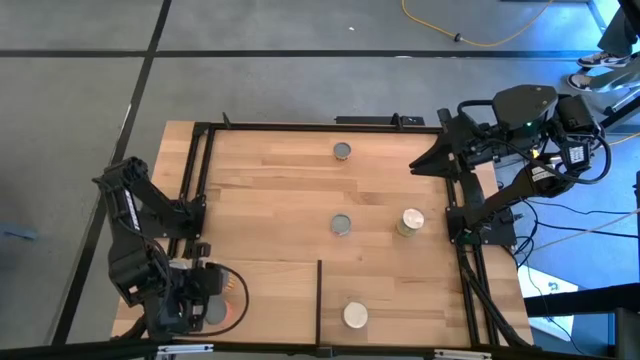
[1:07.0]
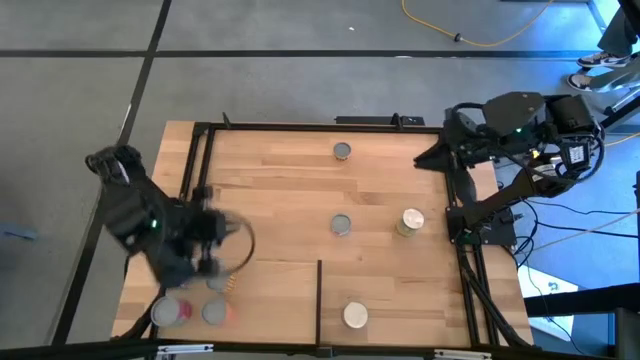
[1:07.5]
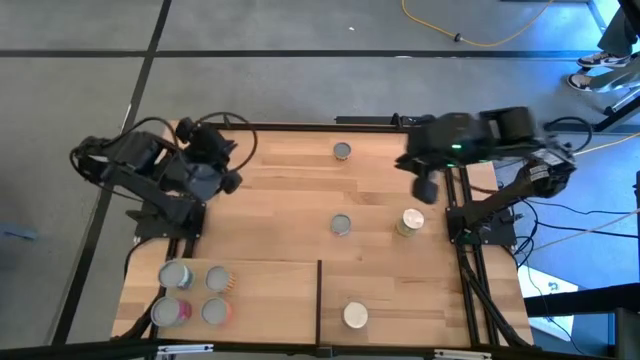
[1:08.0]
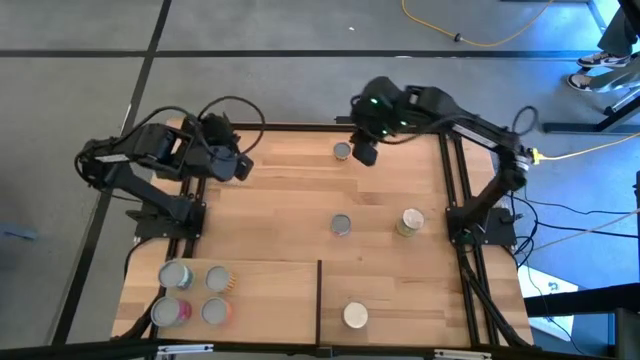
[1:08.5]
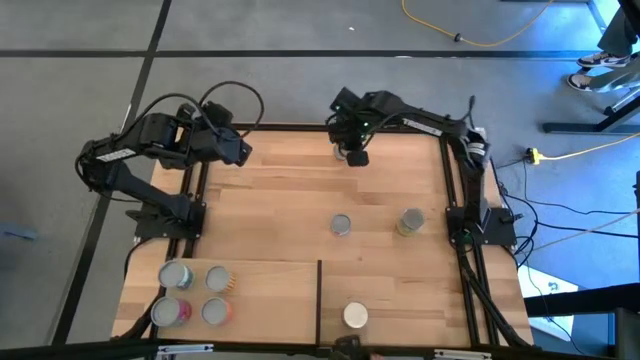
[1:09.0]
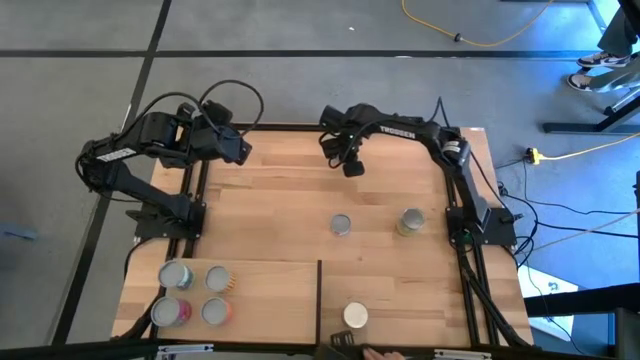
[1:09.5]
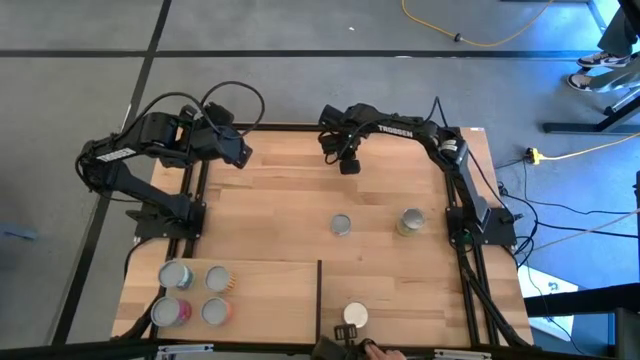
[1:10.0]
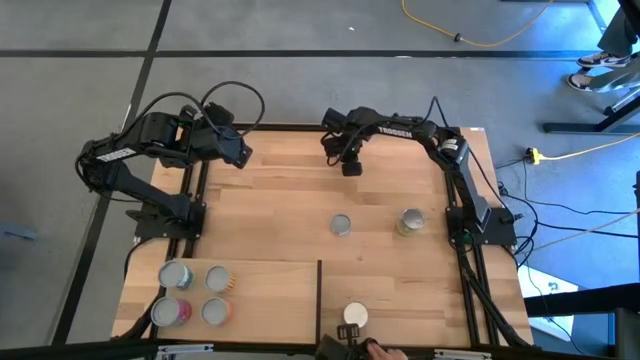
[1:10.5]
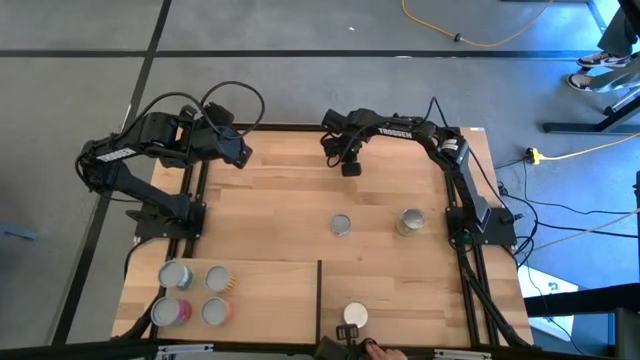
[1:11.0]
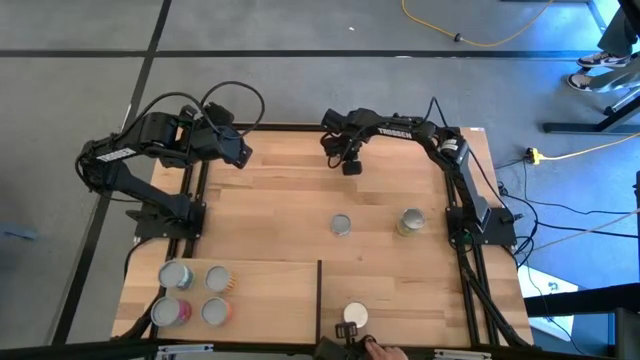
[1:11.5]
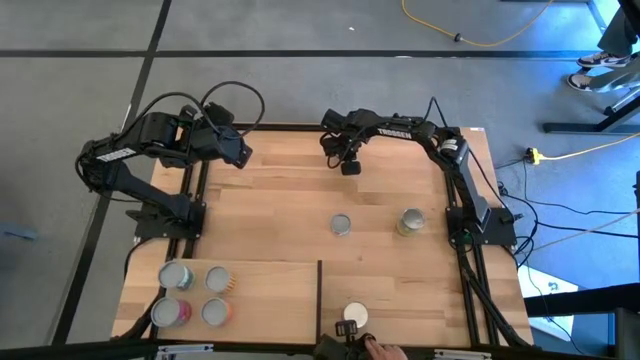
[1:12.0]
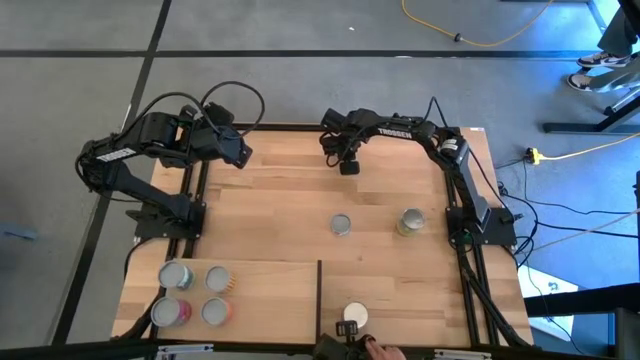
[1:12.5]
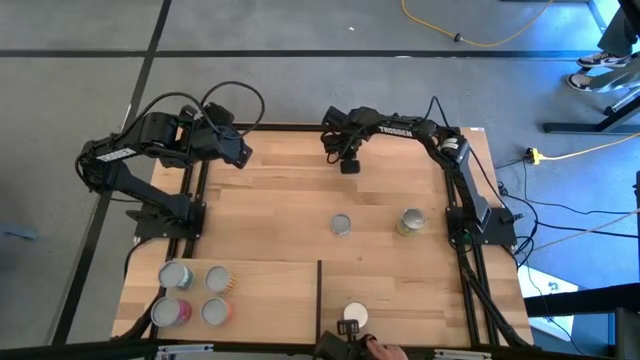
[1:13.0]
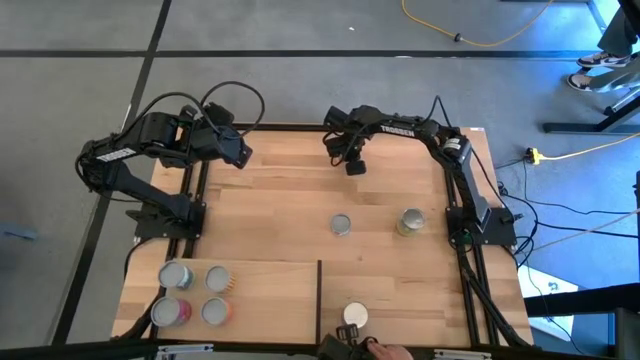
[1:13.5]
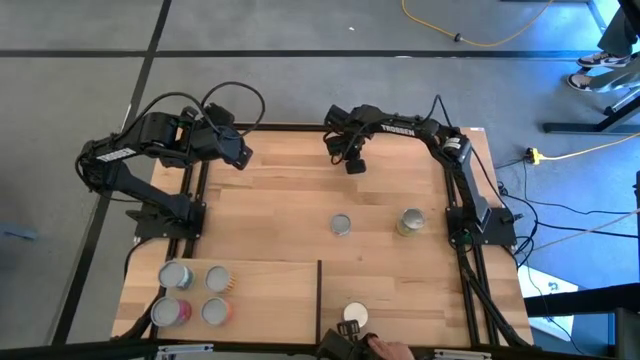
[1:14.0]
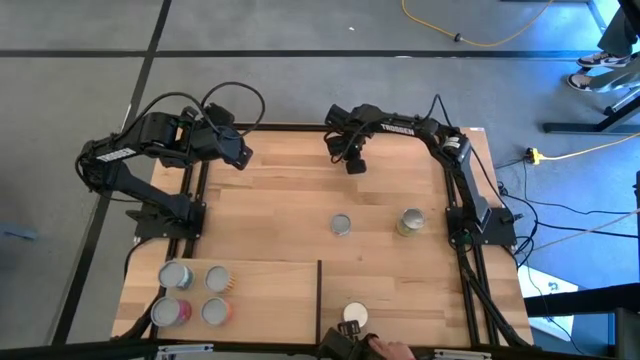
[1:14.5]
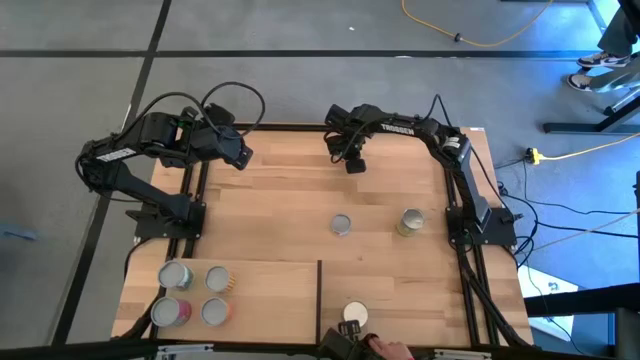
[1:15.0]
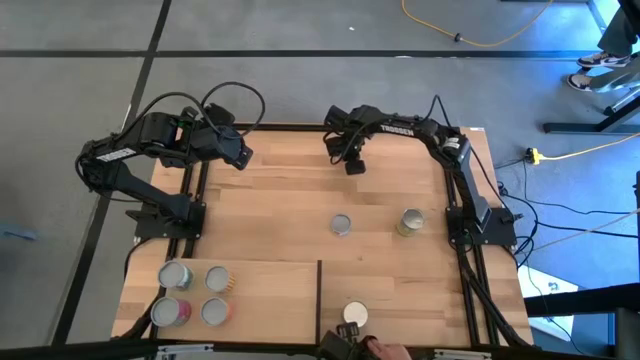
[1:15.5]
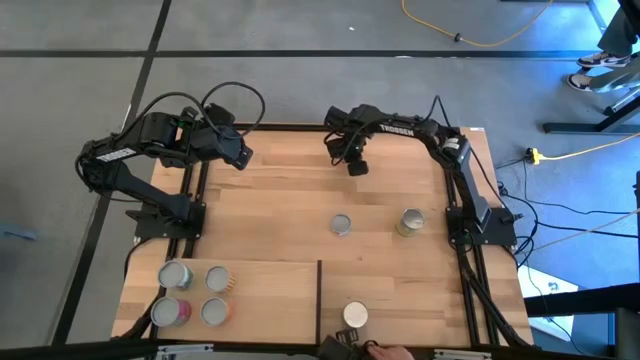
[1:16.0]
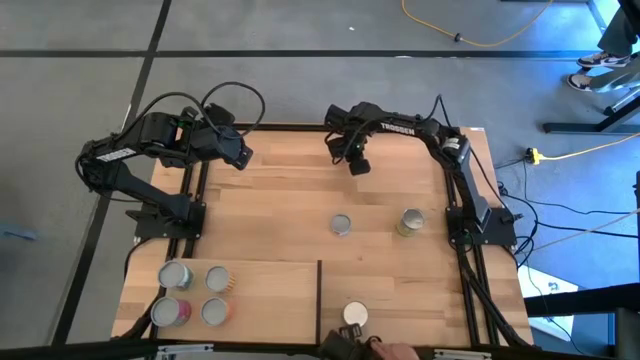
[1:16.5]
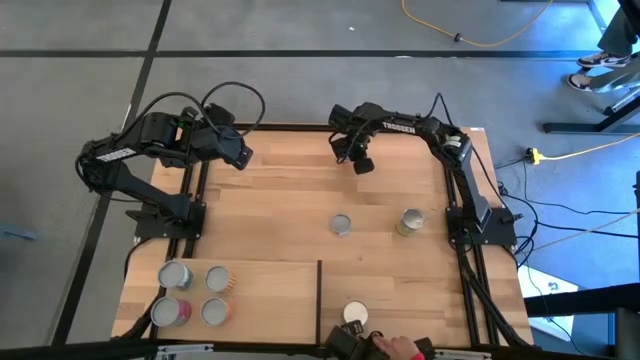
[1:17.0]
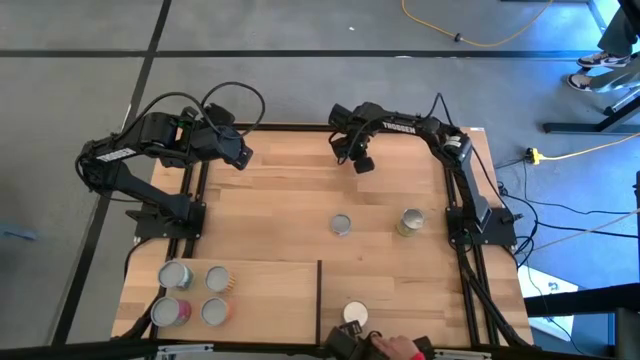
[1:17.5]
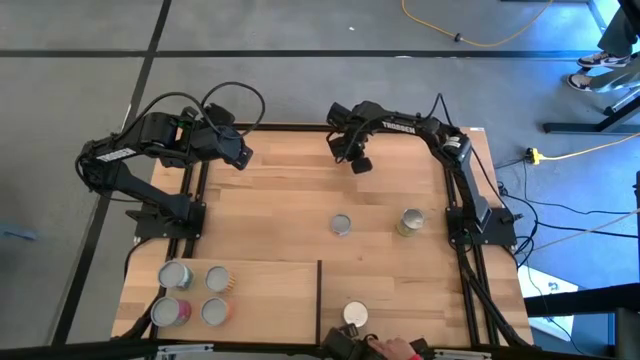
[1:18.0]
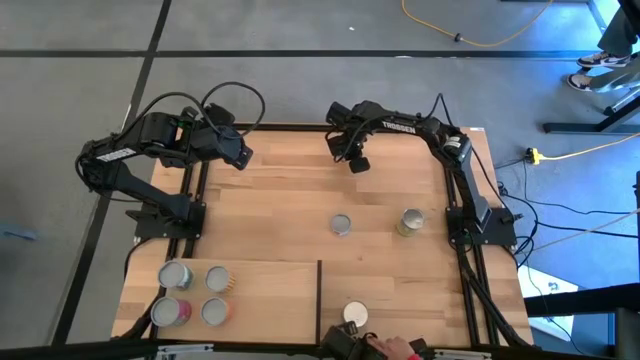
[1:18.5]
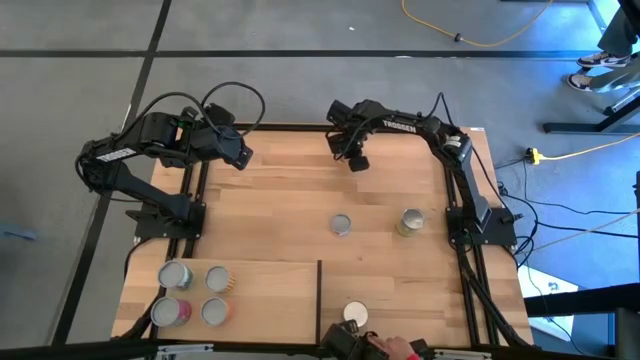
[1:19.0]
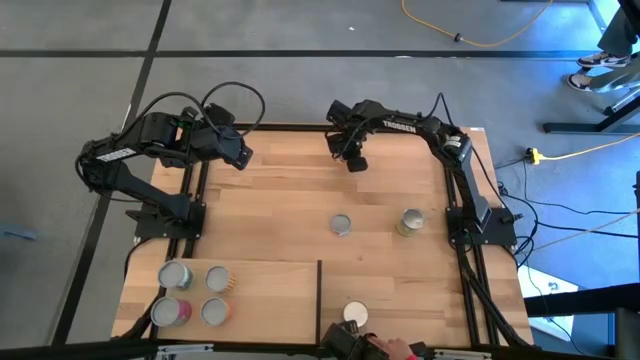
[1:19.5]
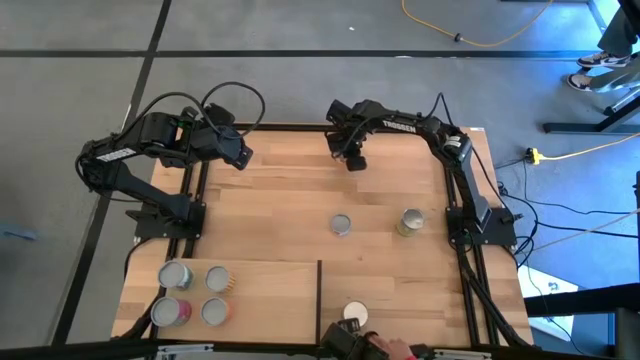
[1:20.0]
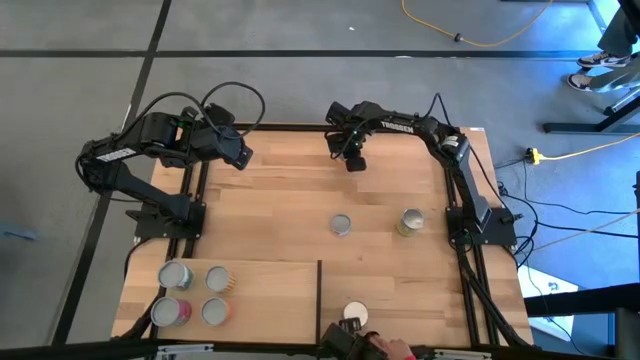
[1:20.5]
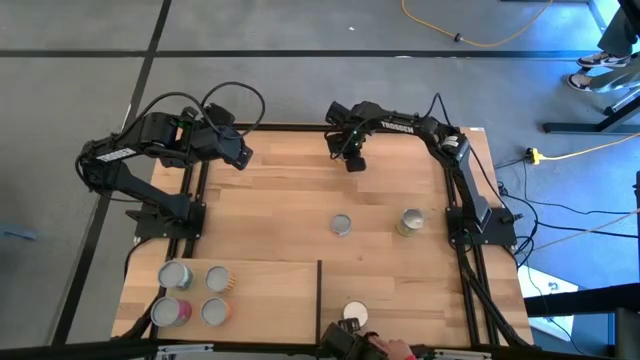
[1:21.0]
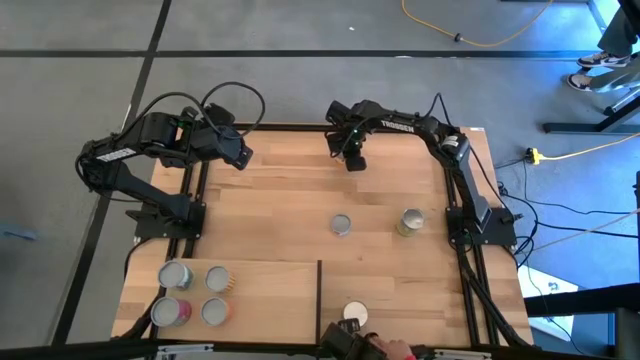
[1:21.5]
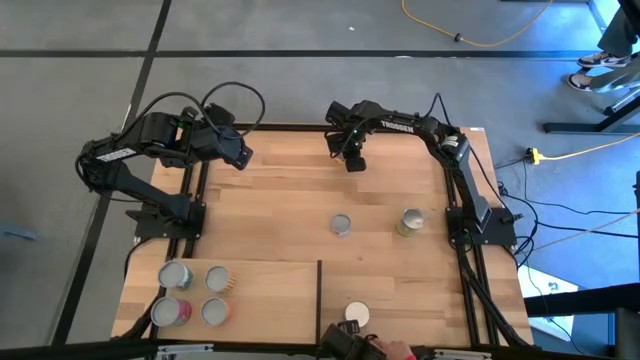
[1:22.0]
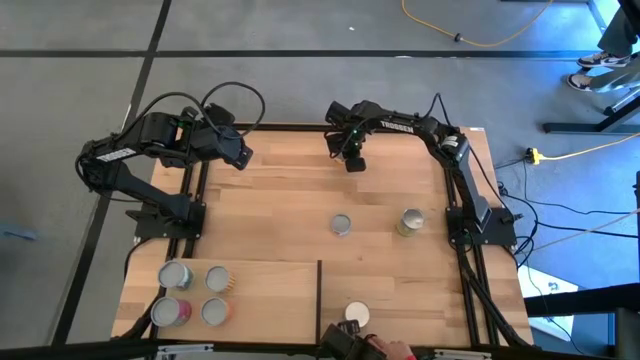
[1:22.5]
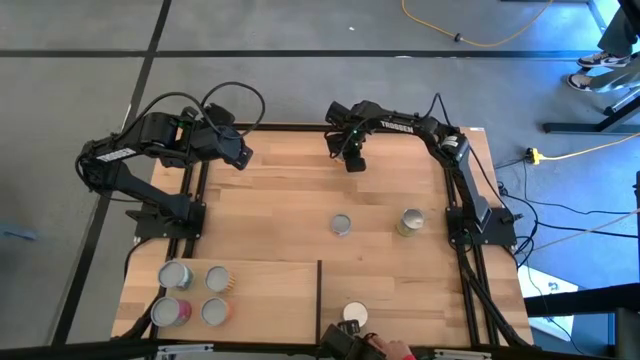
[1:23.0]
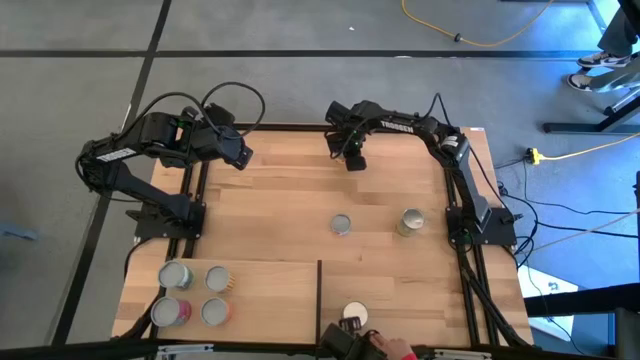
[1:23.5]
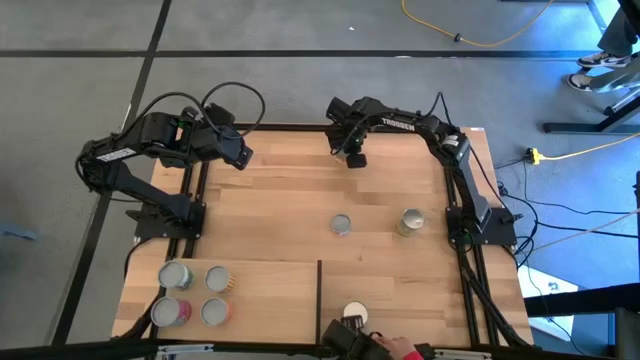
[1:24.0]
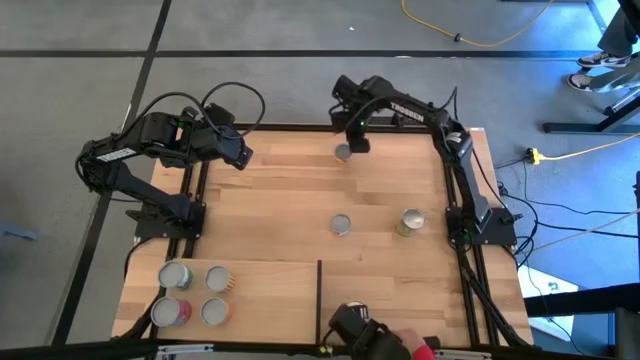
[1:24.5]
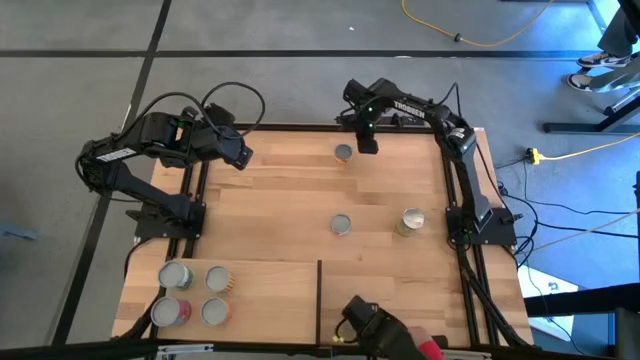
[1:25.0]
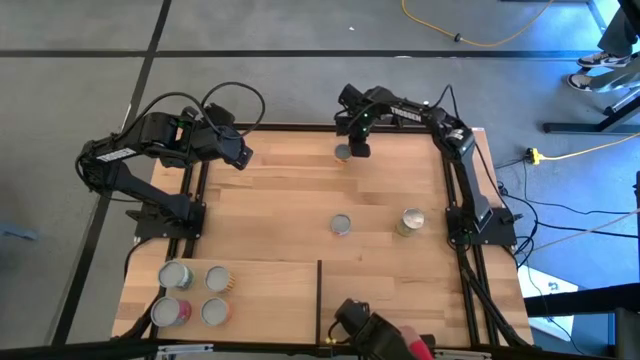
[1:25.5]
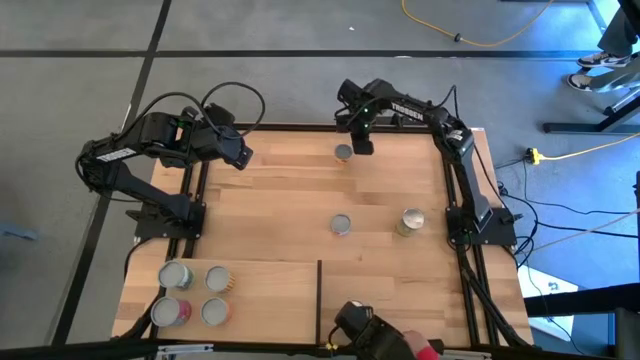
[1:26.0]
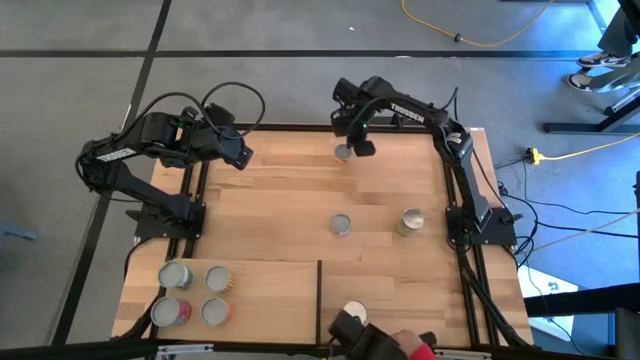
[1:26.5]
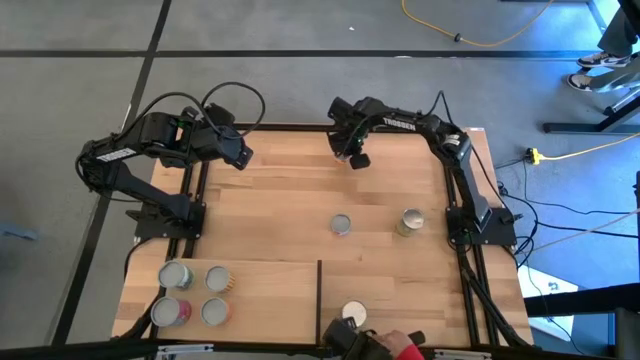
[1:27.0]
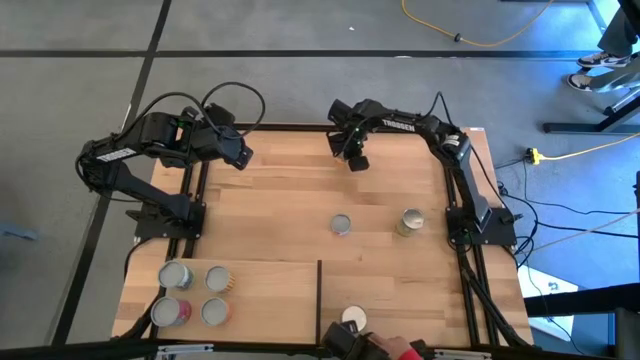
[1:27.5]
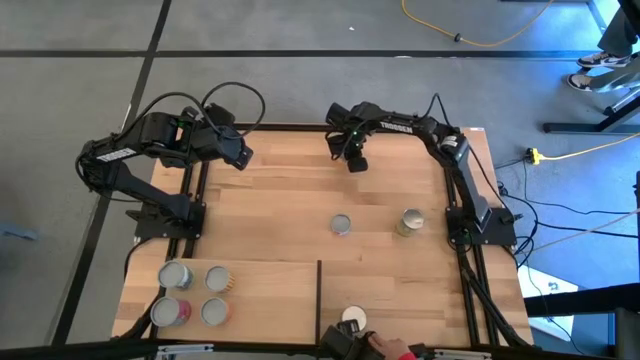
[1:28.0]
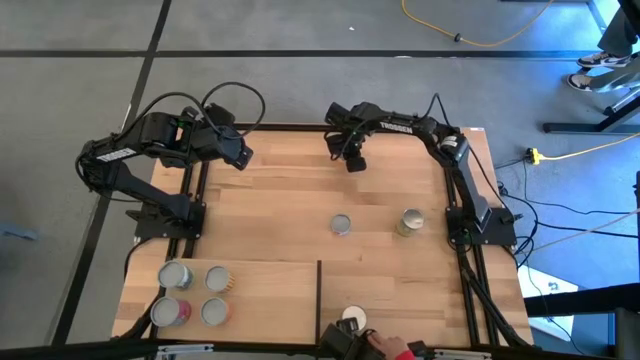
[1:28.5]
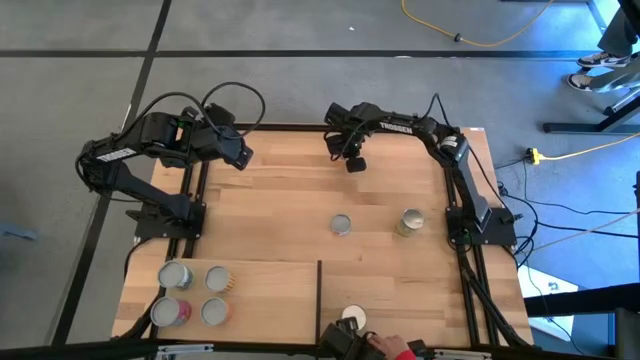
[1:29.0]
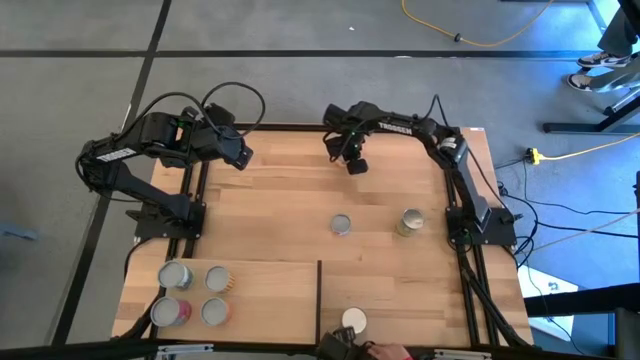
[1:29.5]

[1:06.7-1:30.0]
Task: Pick and place cans onto a shelf
Put the canned pineapple ring on the shelf
